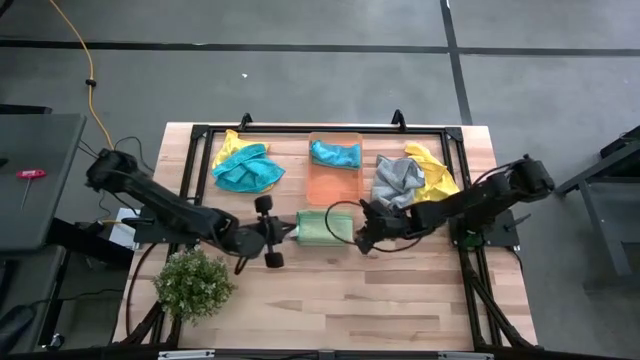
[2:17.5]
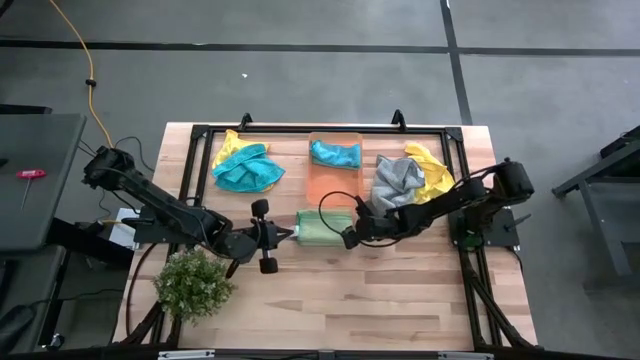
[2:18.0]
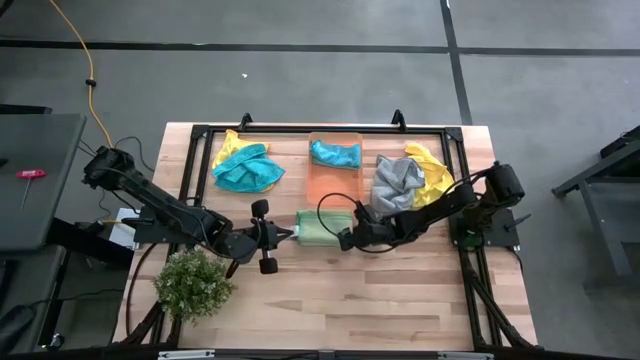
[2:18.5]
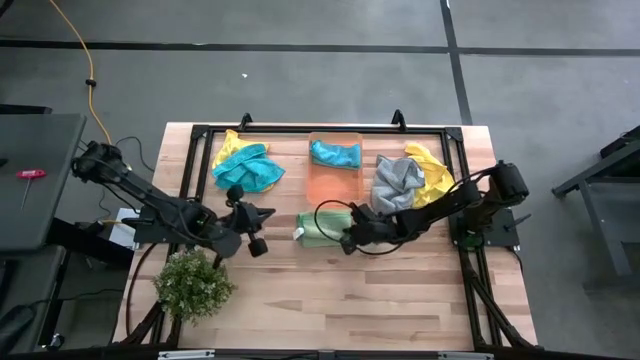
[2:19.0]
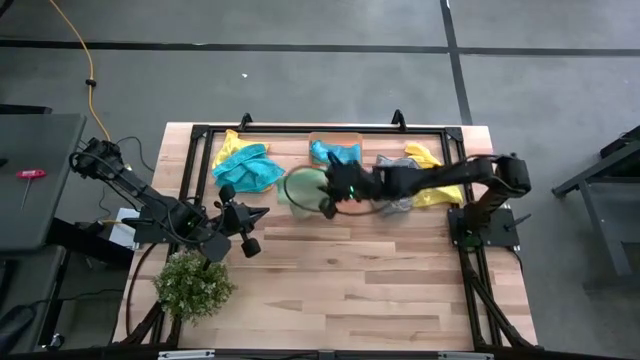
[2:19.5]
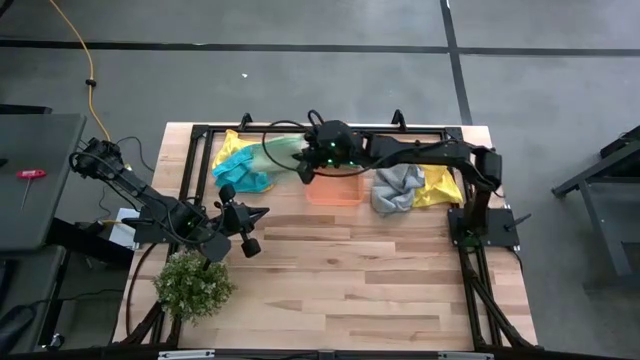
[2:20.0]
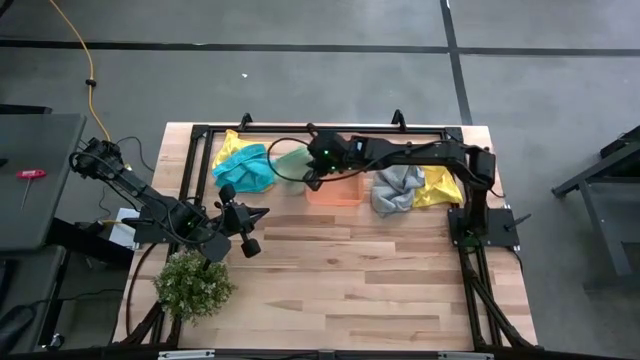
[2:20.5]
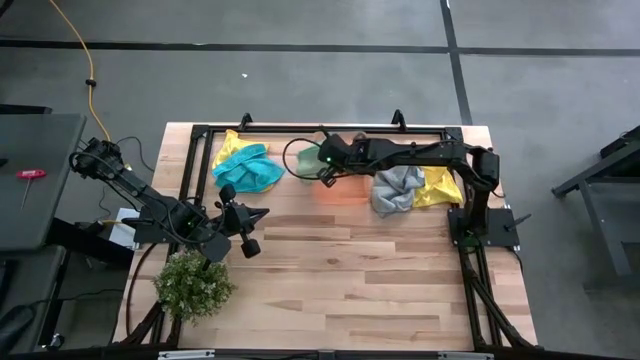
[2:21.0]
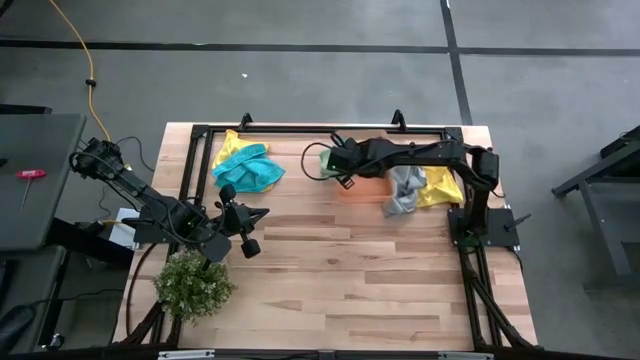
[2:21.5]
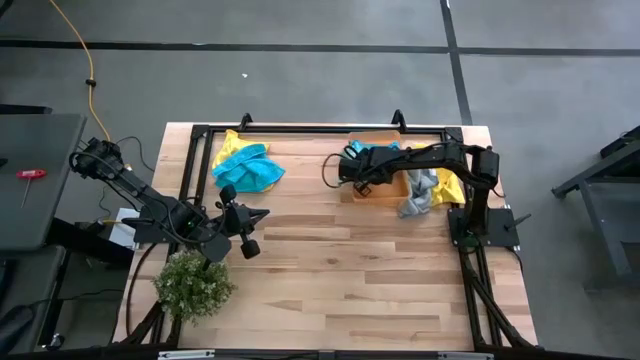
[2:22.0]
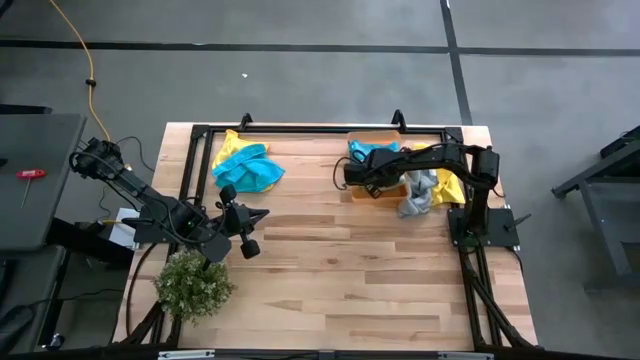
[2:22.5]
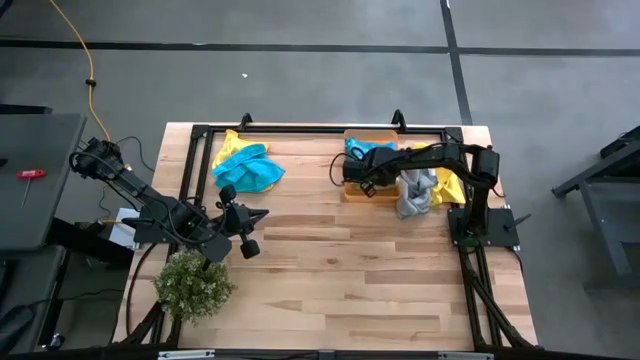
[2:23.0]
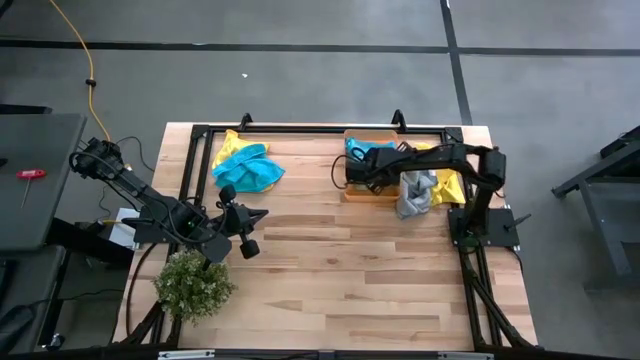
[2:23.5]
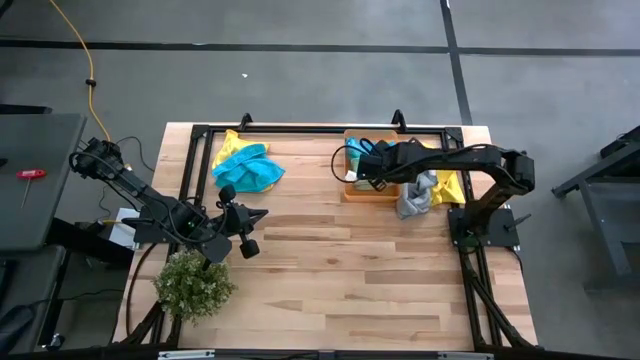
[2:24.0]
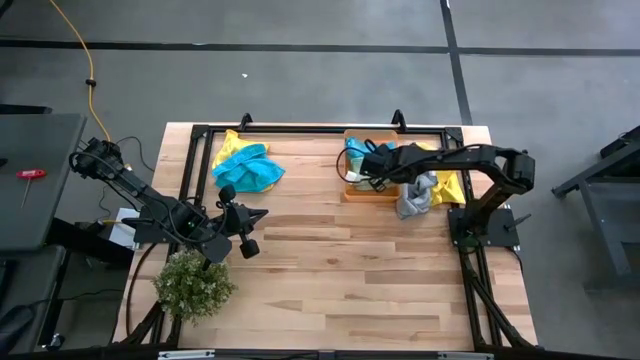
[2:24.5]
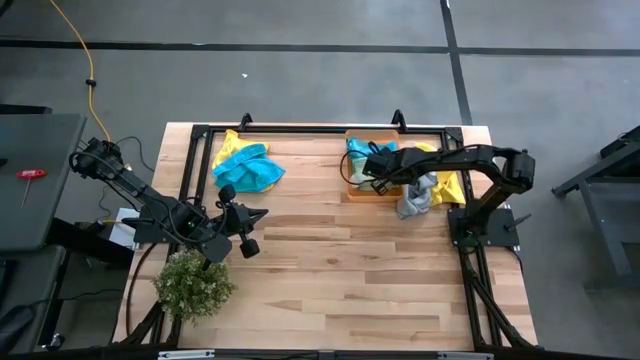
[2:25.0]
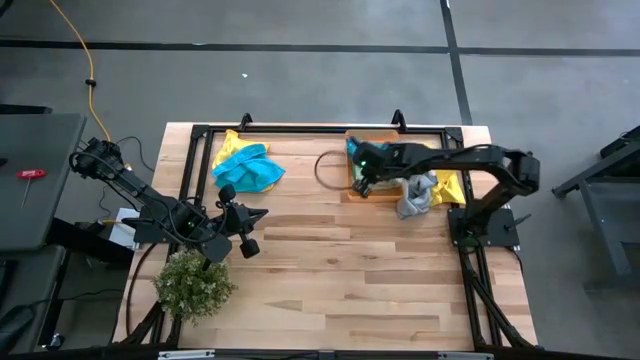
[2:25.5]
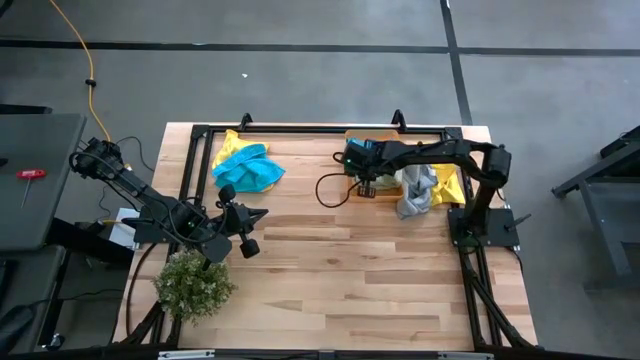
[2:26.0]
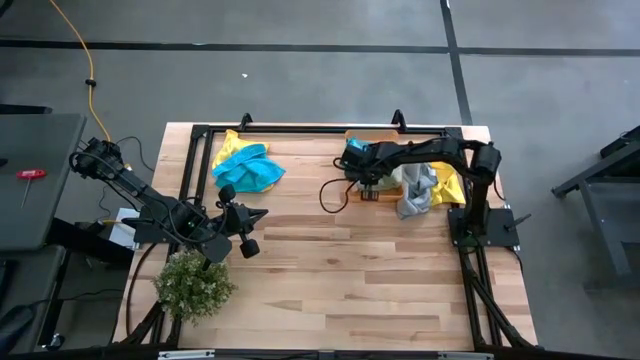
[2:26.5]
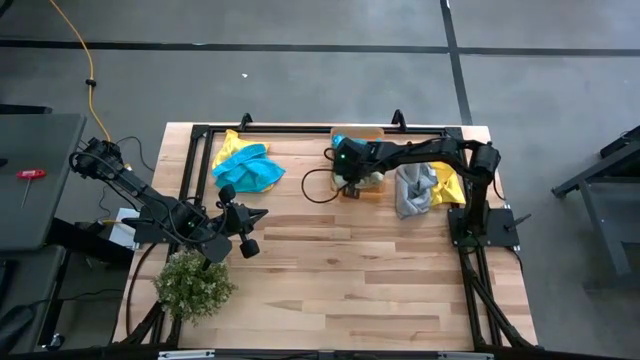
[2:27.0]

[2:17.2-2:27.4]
Task: Fold microfiber towels
Put the folded green microfiber cloth into the orange bin

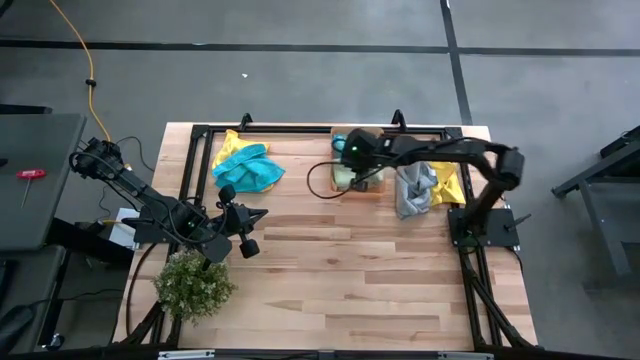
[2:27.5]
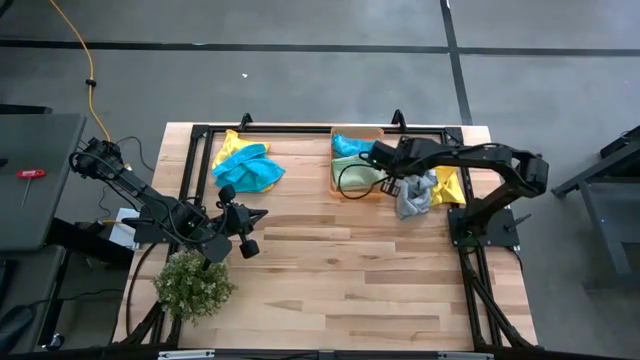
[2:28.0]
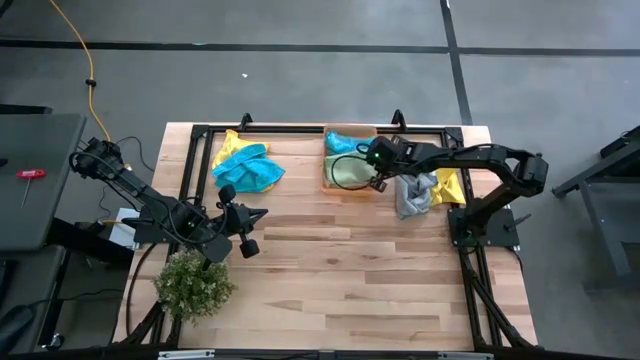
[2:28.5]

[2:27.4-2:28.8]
Adjust the orange bin

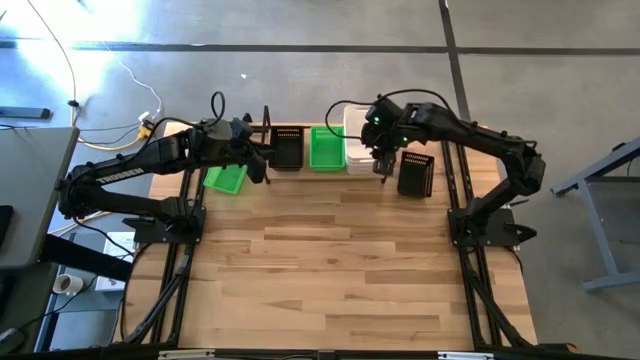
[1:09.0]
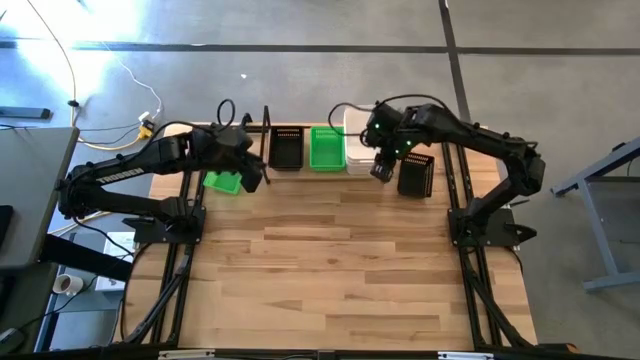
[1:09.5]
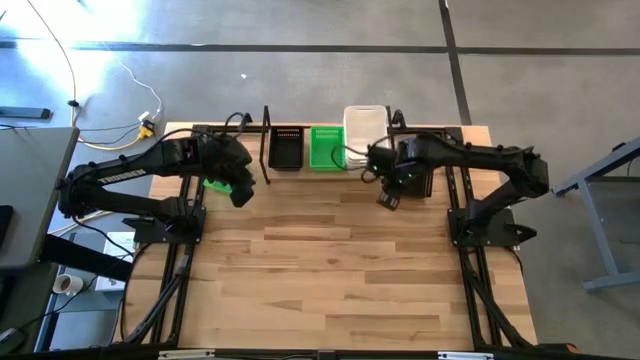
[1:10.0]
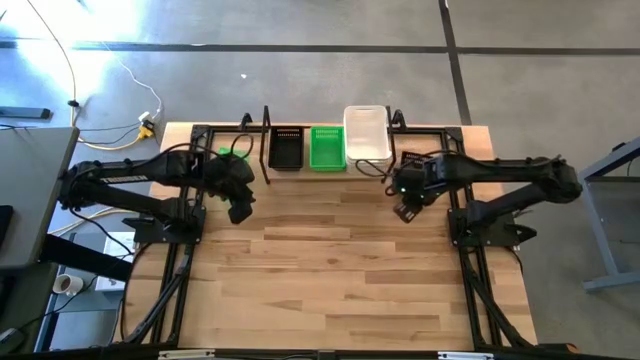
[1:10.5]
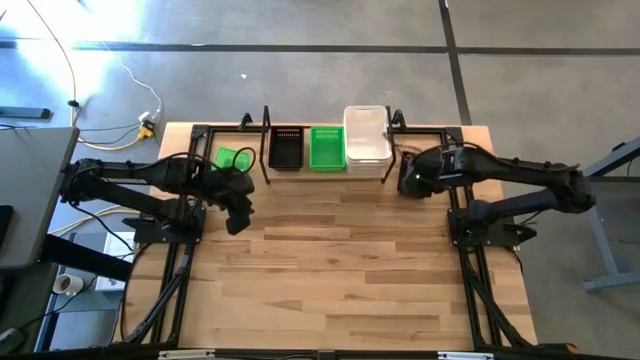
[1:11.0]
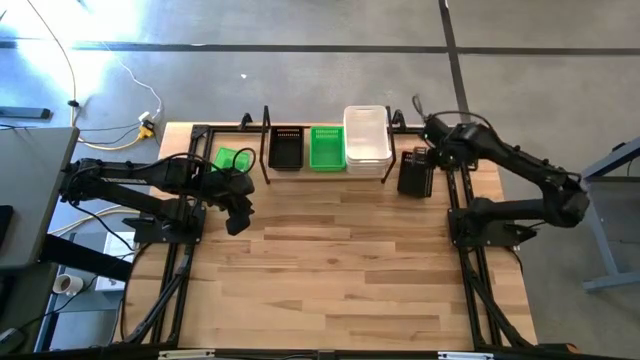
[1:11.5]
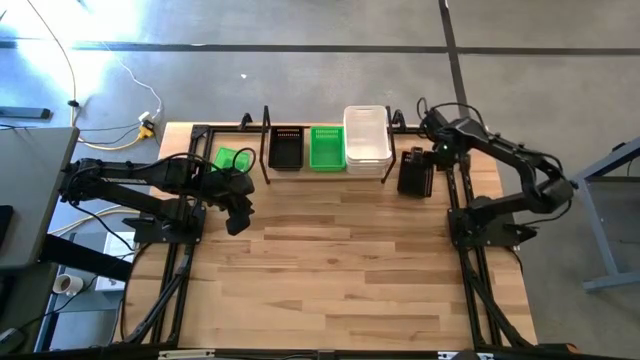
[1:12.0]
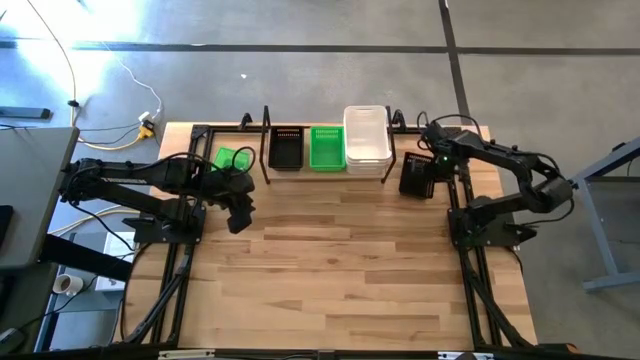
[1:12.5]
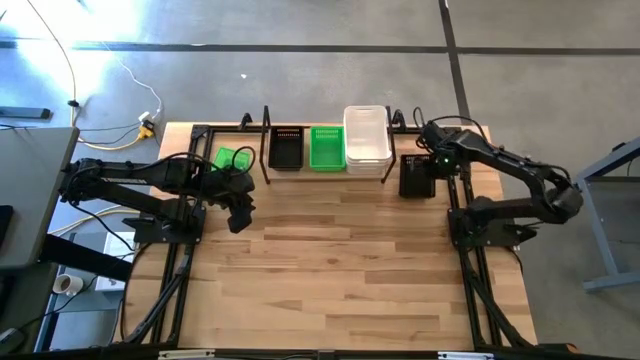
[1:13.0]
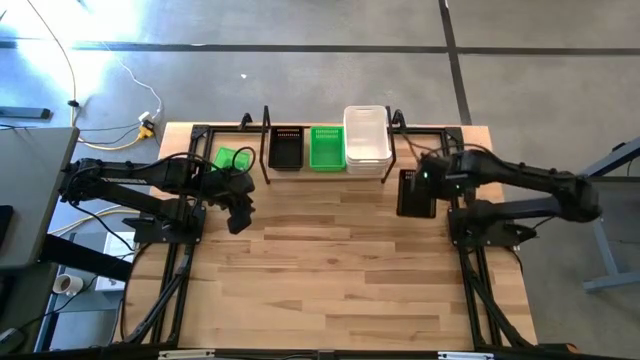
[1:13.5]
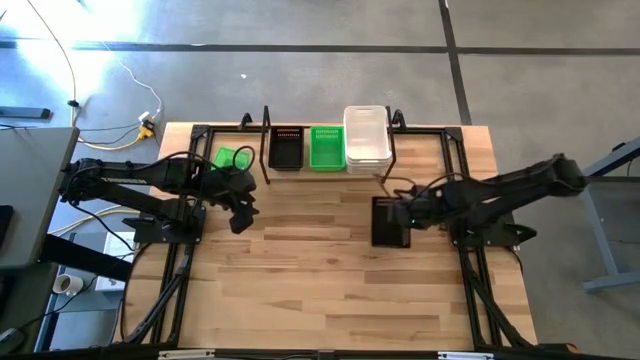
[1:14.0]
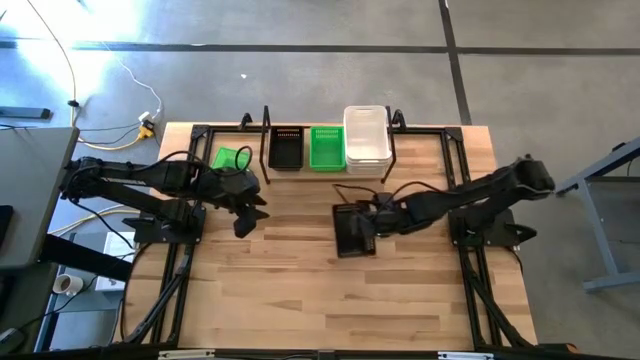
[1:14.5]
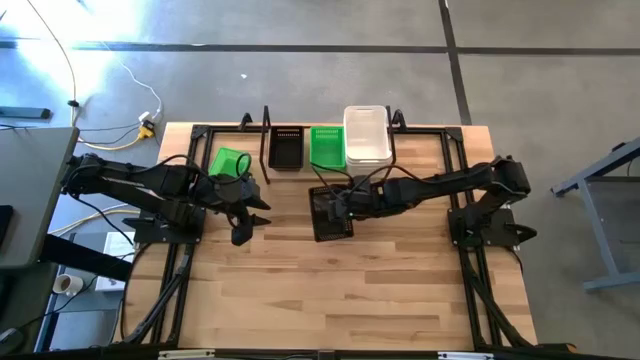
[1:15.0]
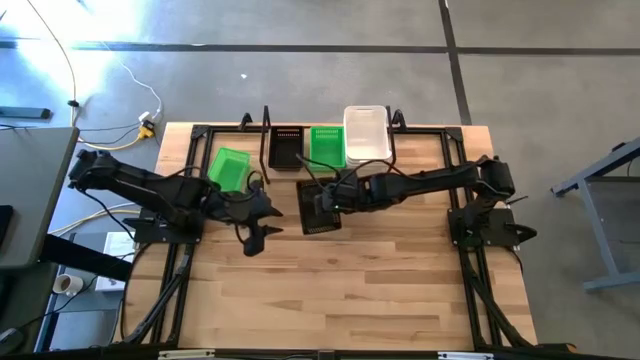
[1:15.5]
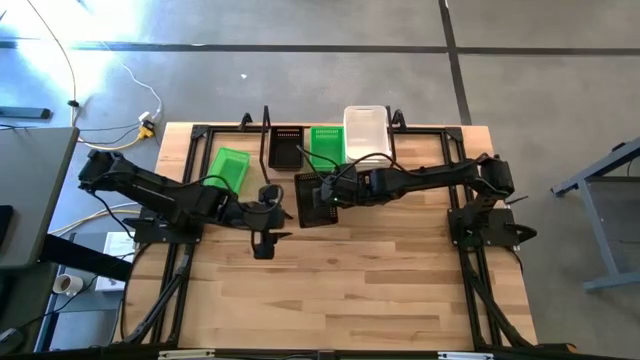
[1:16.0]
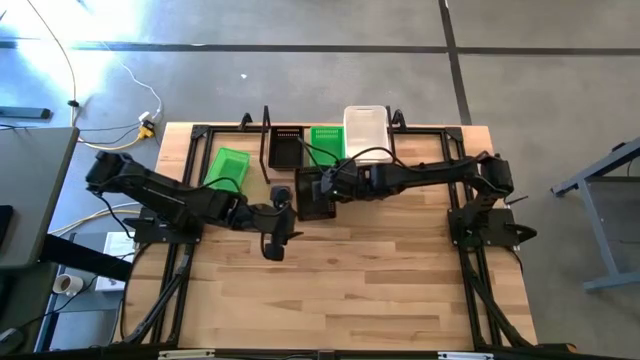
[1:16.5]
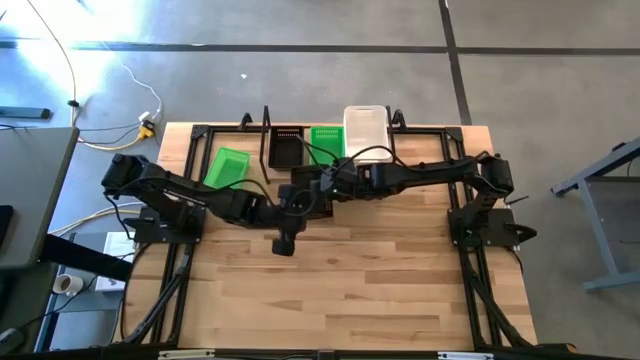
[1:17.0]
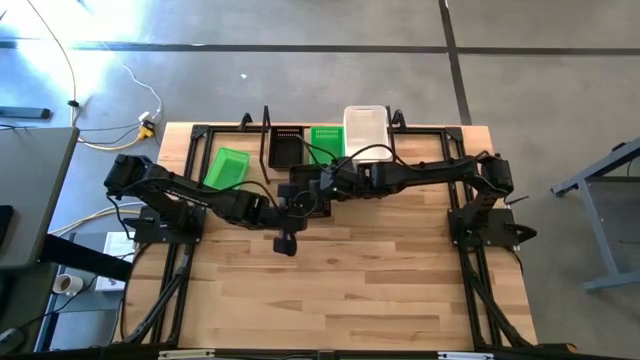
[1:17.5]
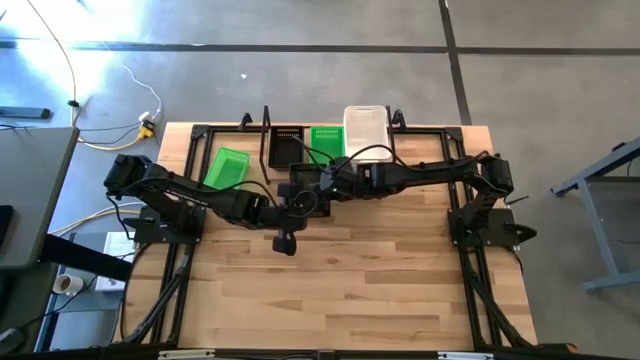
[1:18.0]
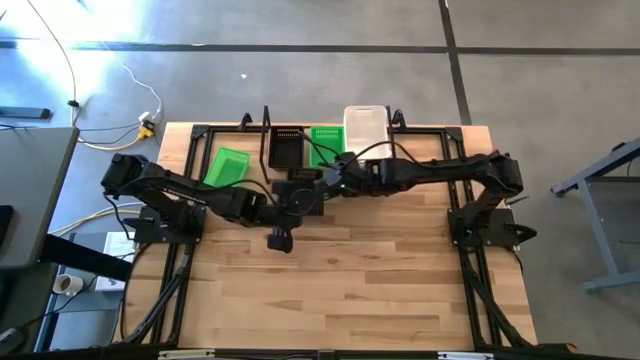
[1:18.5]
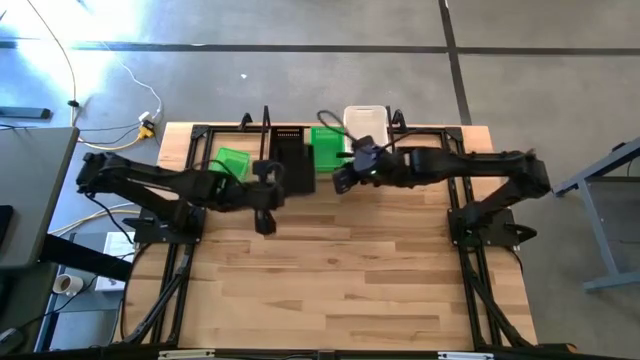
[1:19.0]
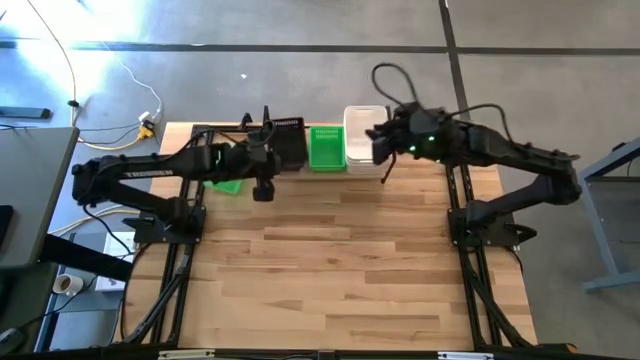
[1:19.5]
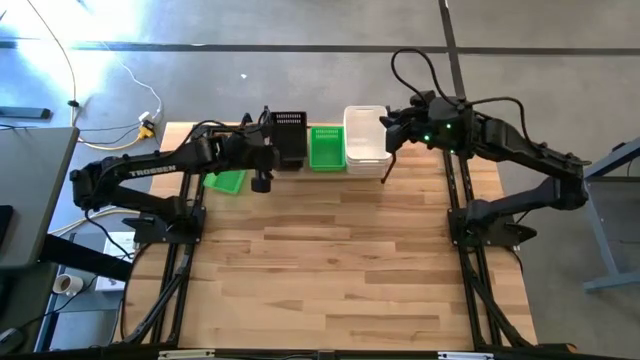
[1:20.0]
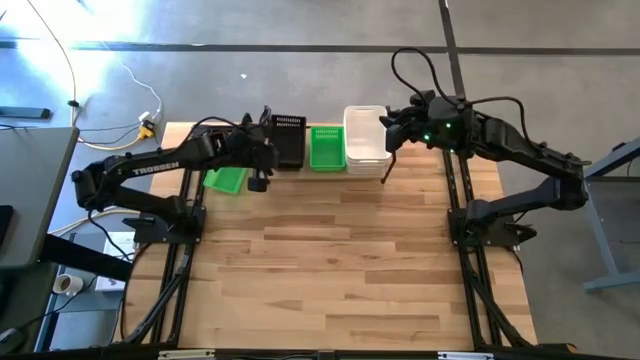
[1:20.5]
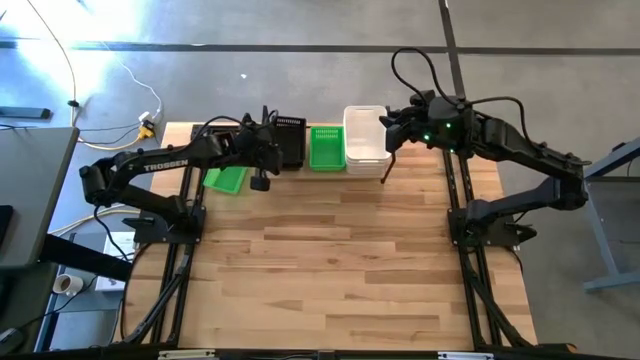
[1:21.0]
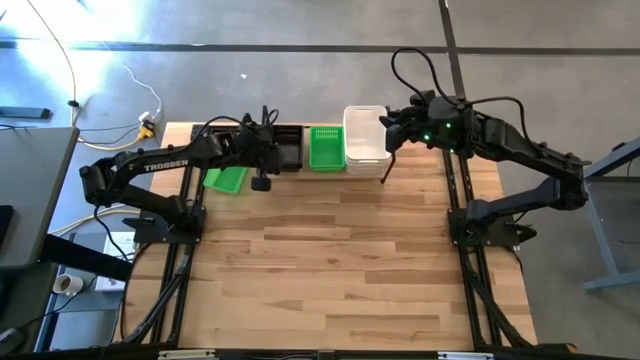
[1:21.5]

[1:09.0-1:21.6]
Task: Stack baskets on shelf by color
Stack the black bin on the stacked black bins on the shelf
